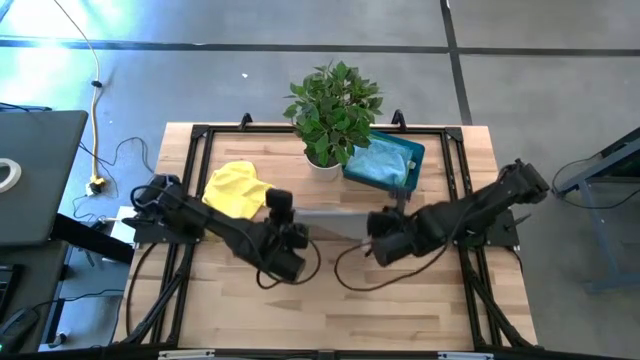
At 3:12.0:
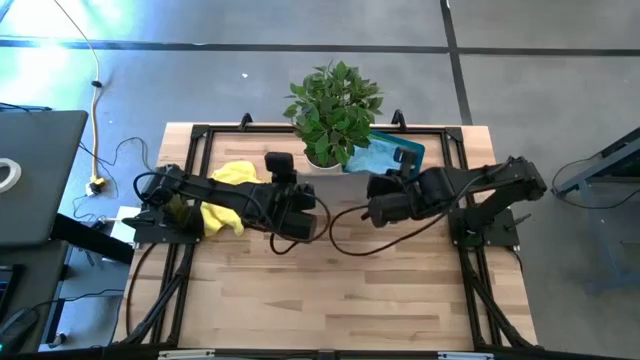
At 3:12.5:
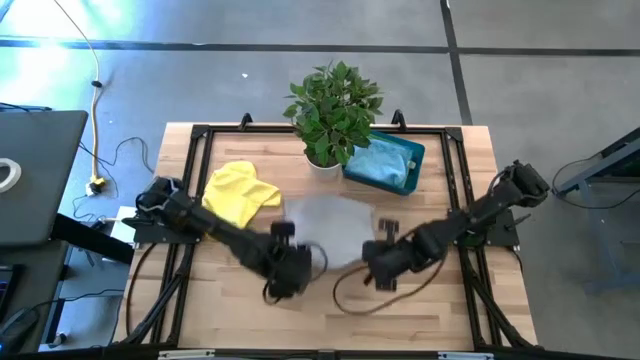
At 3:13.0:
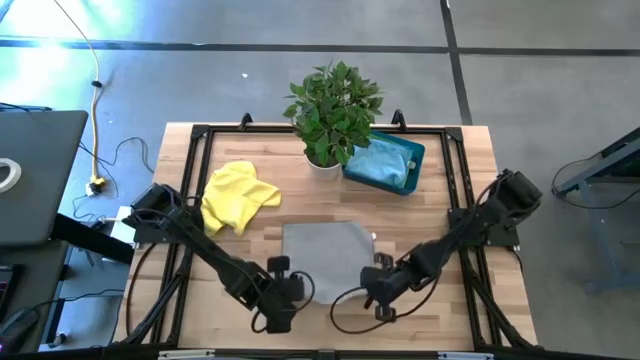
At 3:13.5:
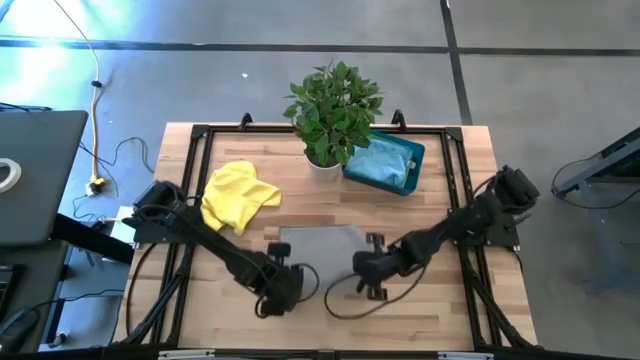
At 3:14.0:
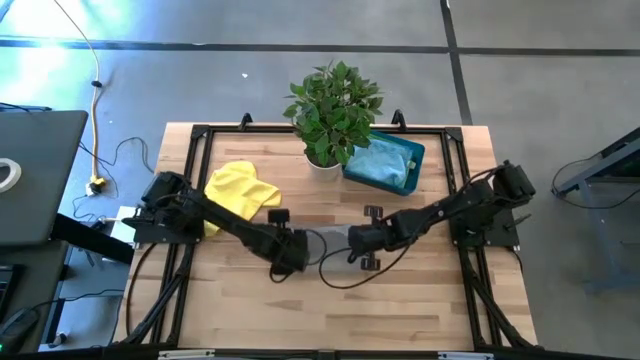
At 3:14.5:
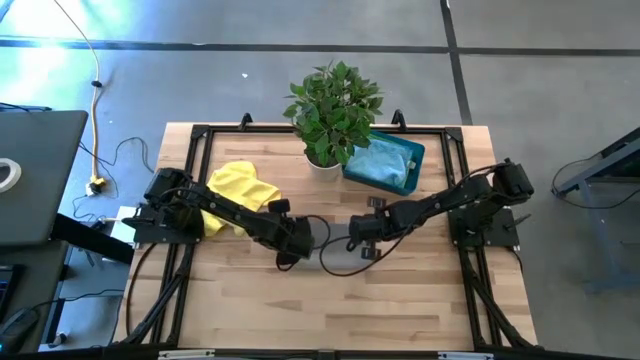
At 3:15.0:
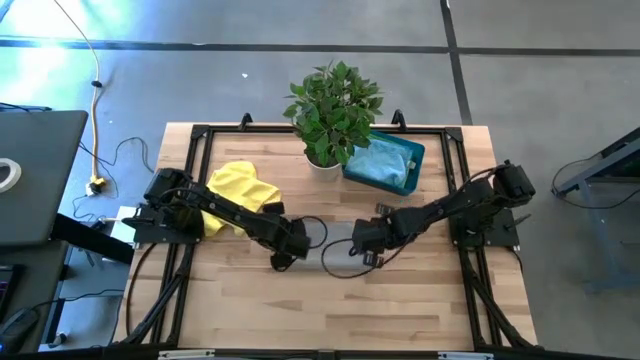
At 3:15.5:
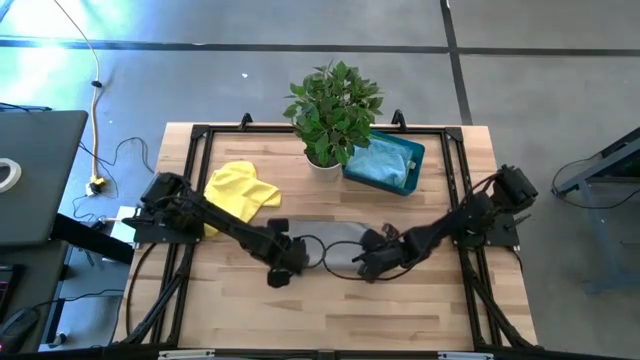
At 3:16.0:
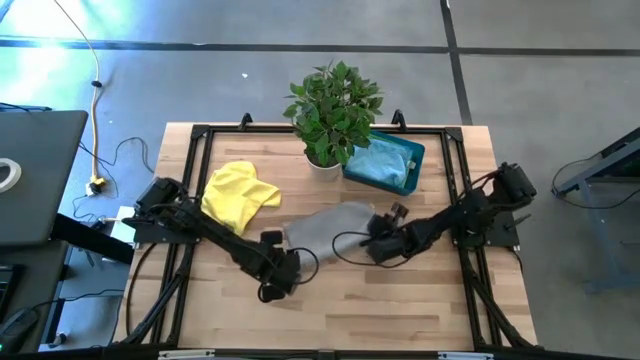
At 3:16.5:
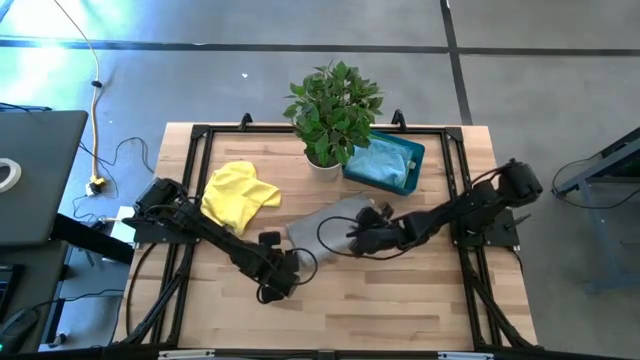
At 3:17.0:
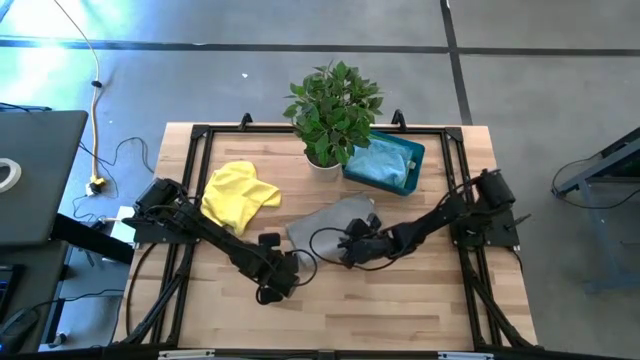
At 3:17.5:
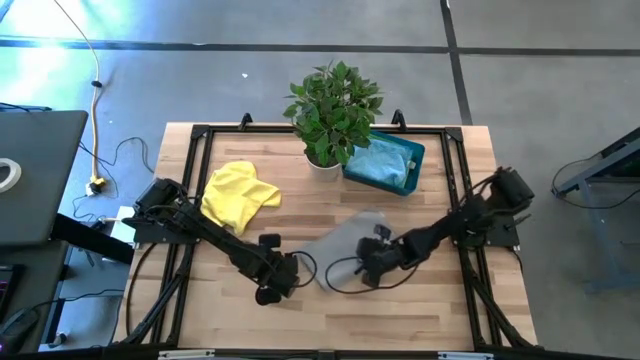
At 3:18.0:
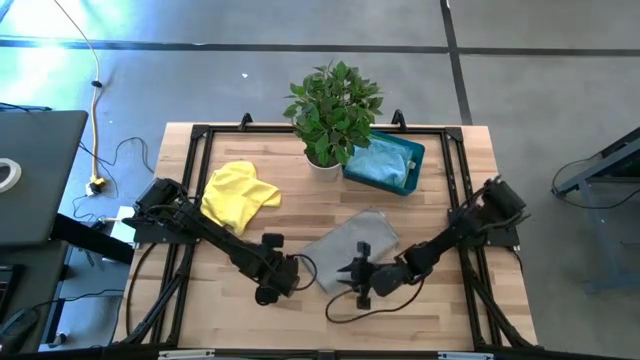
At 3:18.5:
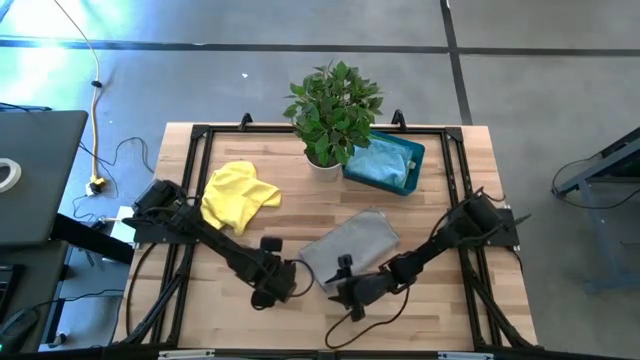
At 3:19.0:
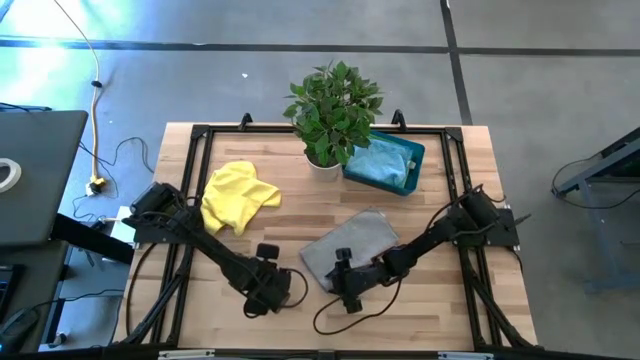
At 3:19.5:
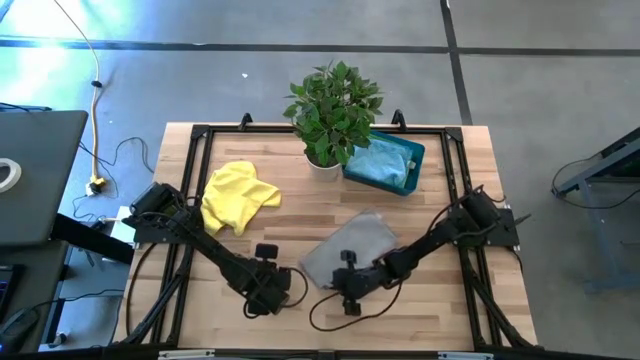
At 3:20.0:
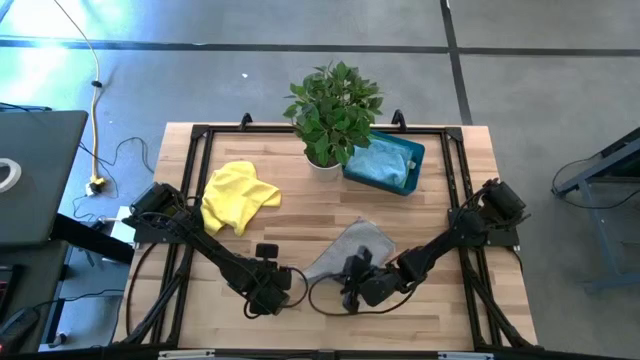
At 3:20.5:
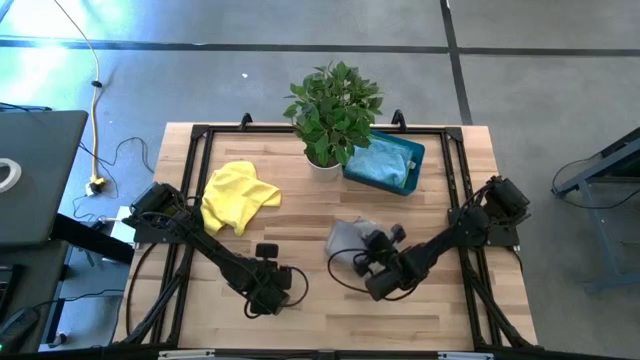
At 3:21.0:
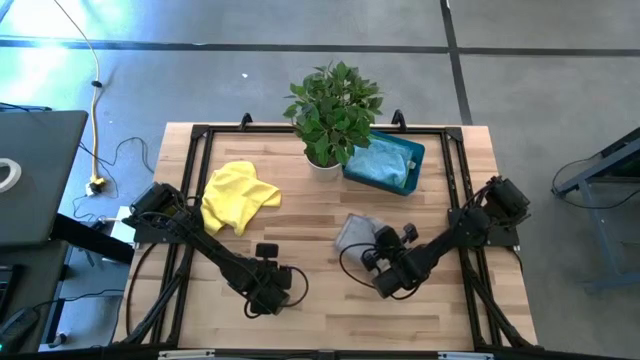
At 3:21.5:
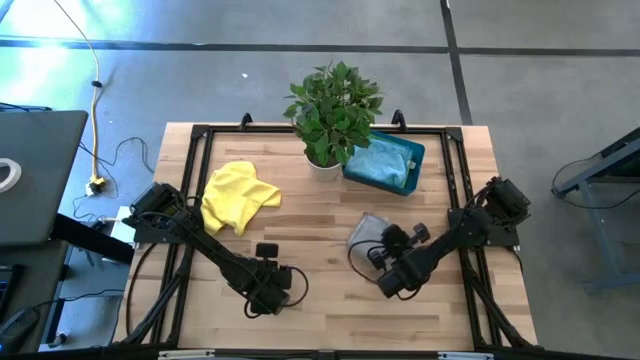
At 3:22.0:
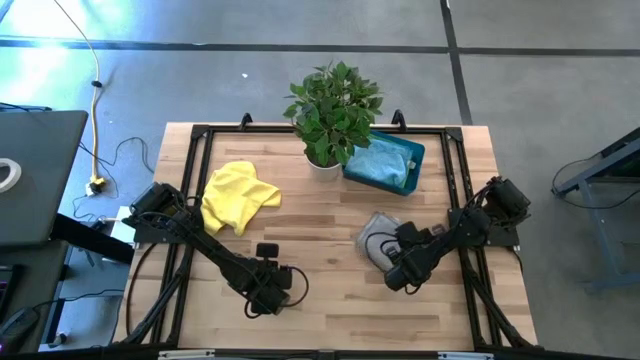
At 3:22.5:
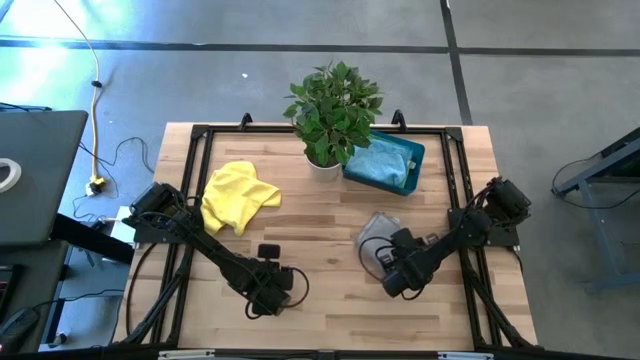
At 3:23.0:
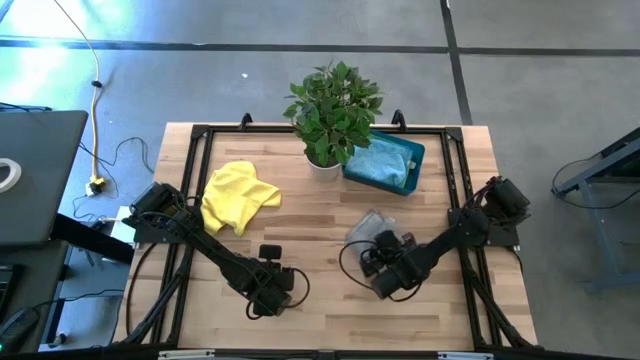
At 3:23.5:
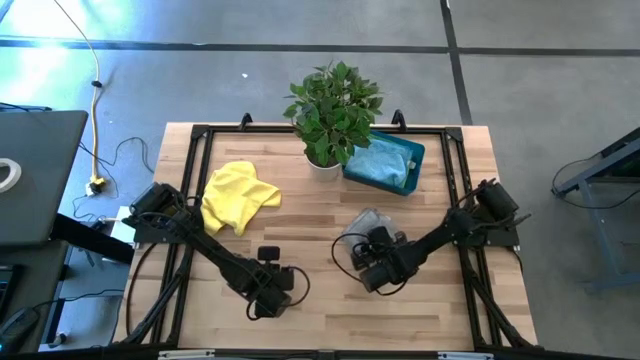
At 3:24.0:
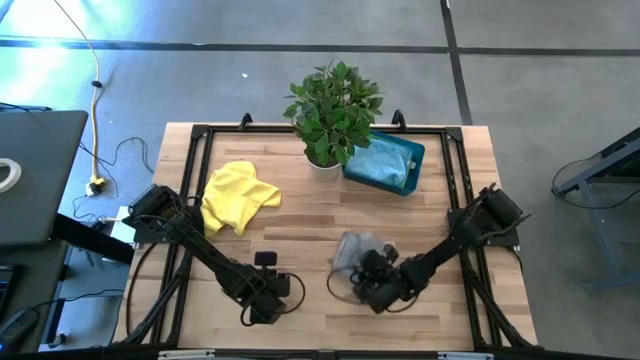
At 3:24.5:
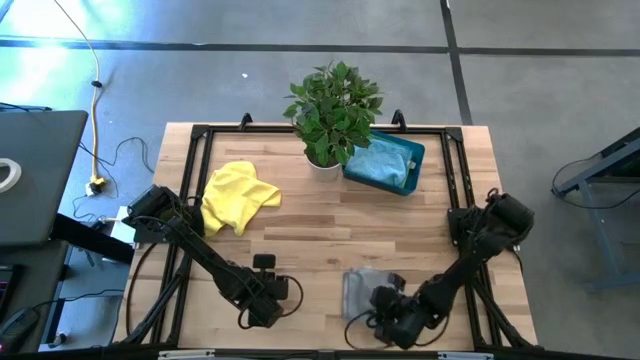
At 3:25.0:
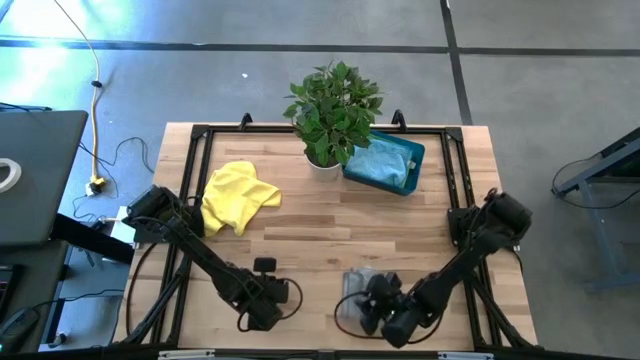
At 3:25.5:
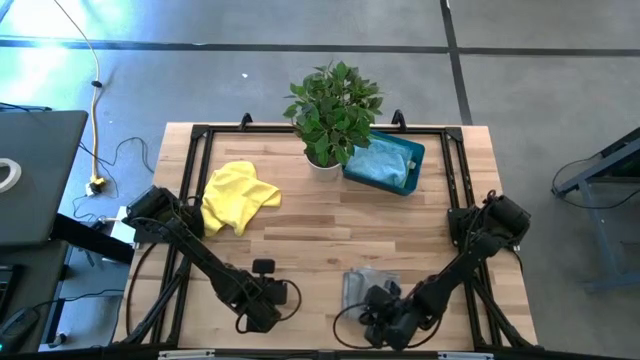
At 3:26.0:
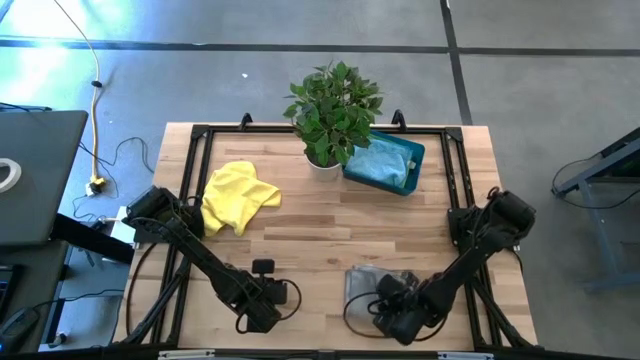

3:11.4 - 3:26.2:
Task: Fold microfiber towels
Fold the gray towel

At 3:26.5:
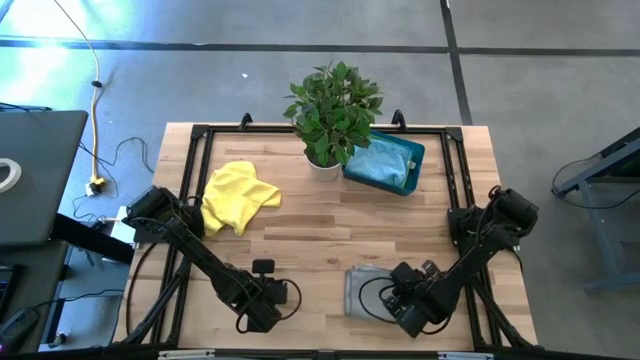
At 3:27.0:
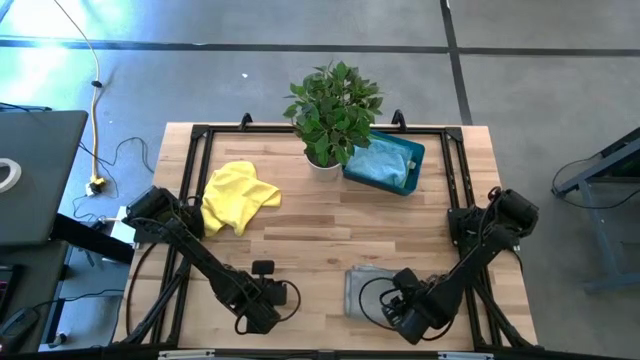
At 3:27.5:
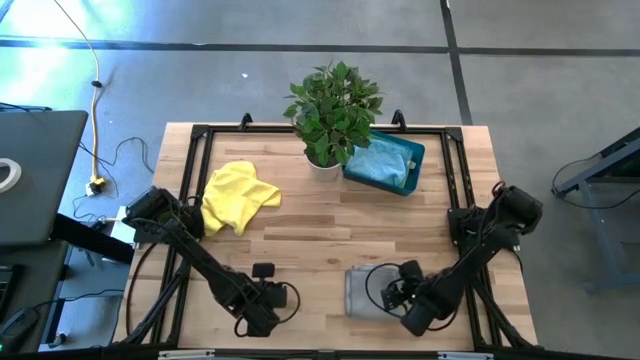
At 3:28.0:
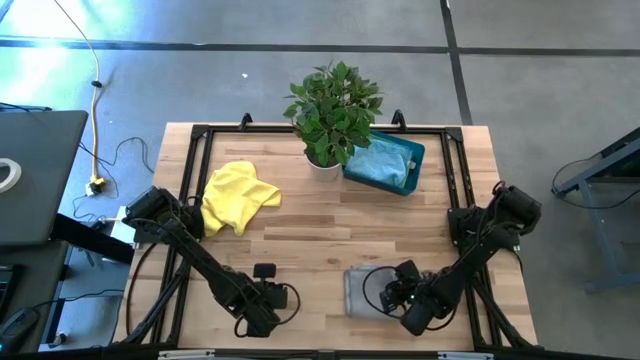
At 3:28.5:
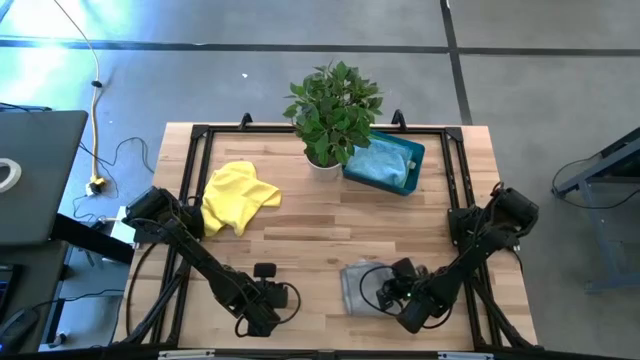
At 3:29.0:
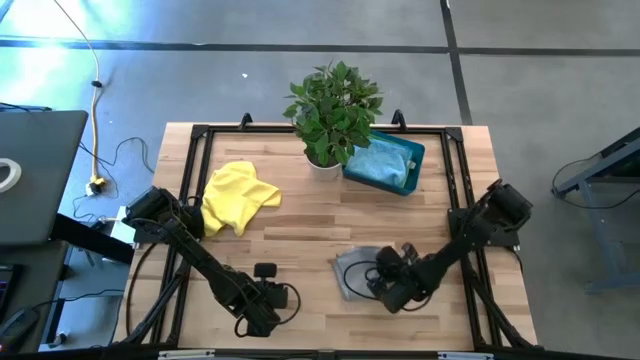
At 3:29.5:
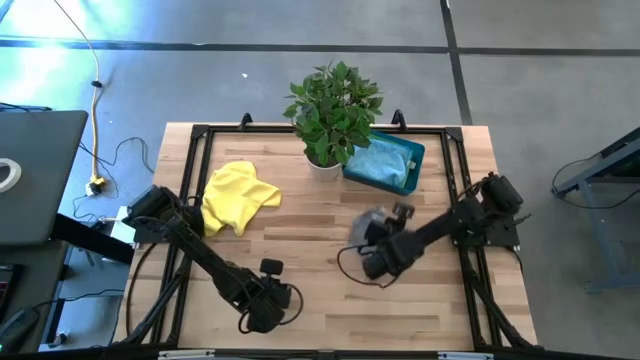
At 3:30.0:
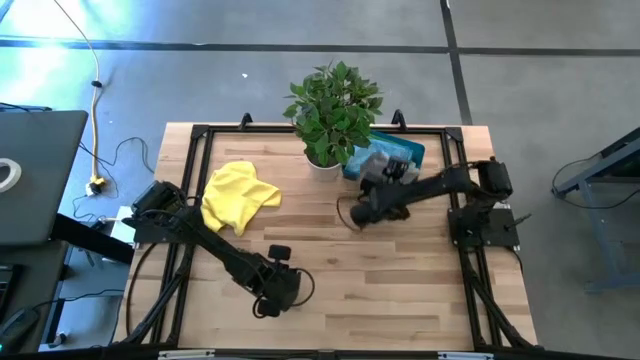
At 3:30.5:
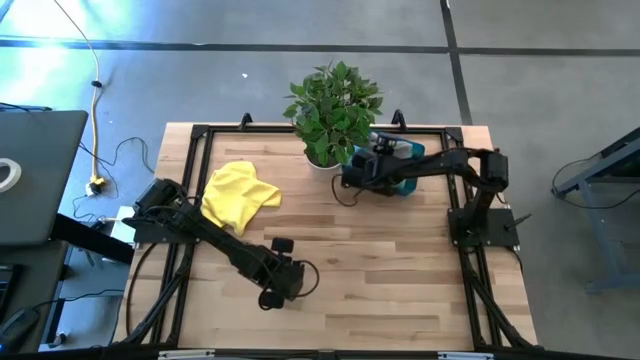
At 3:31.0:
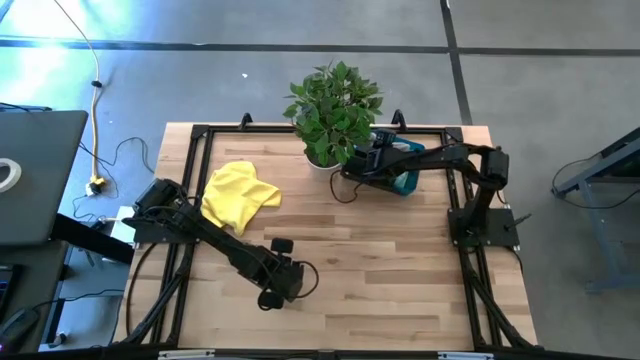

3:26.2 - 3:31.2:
Put the gray towel into the blue bin
